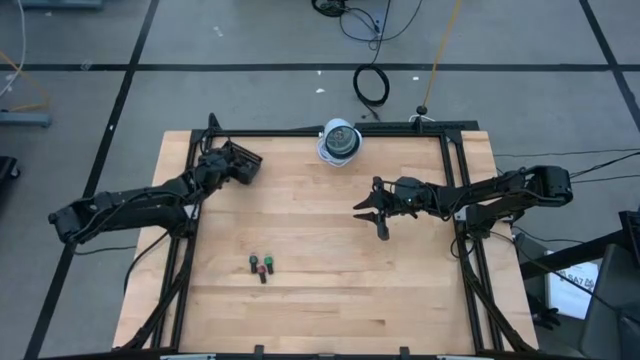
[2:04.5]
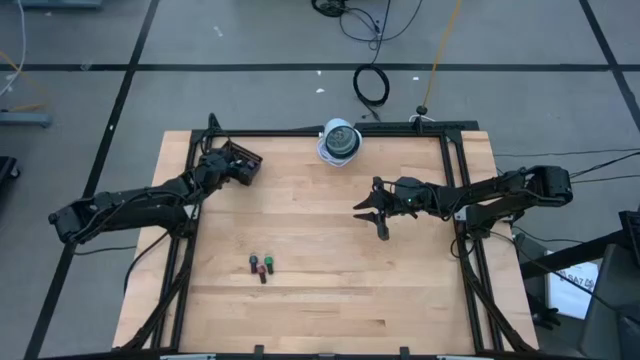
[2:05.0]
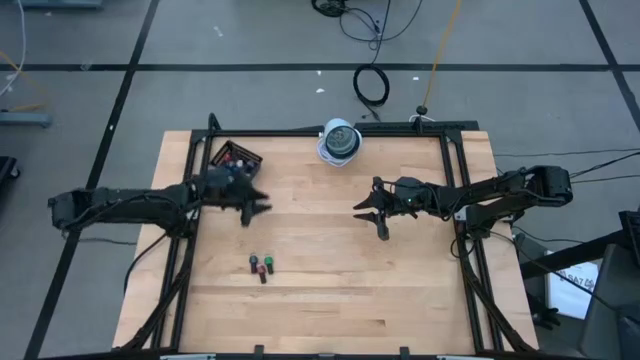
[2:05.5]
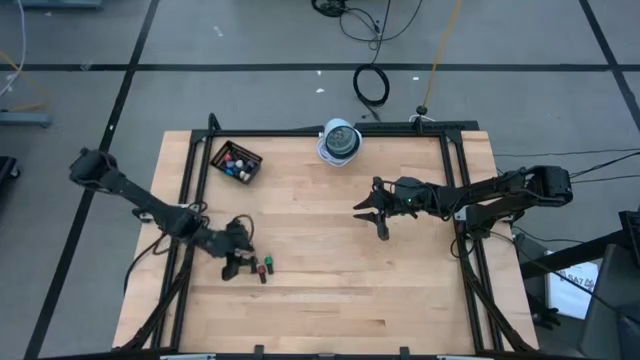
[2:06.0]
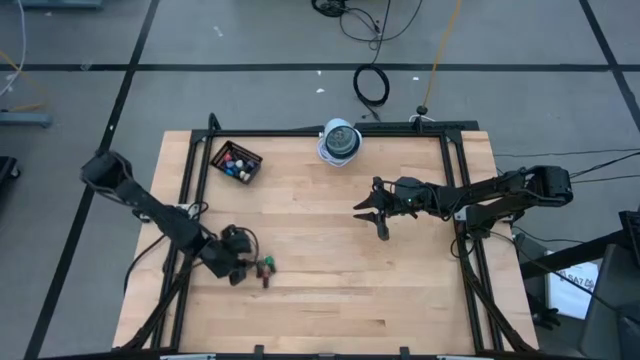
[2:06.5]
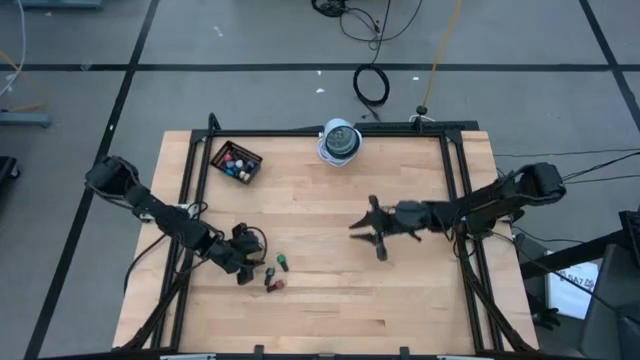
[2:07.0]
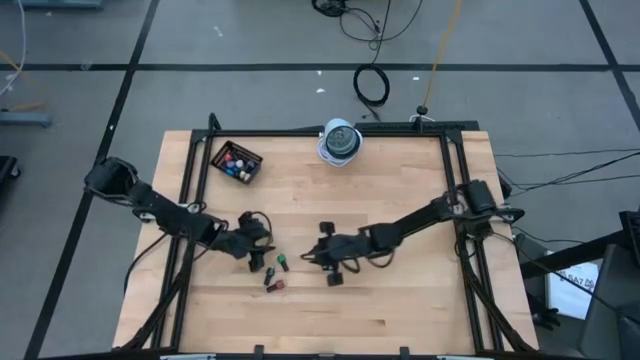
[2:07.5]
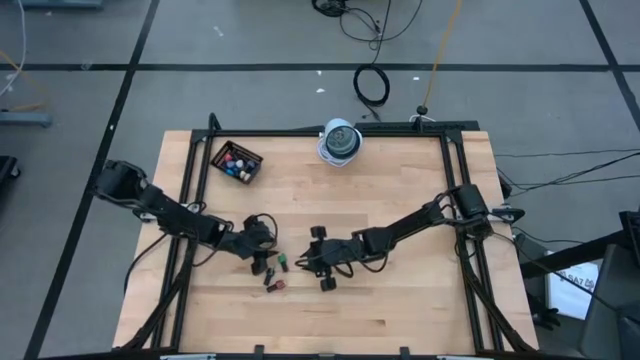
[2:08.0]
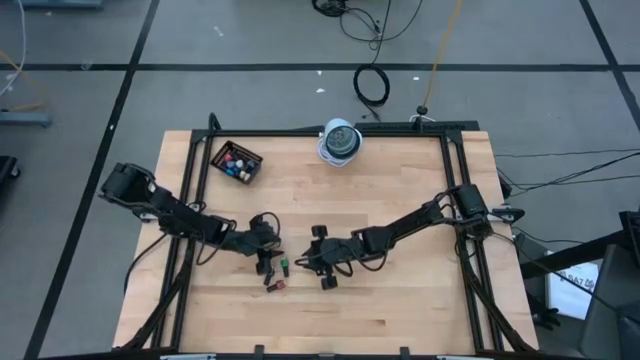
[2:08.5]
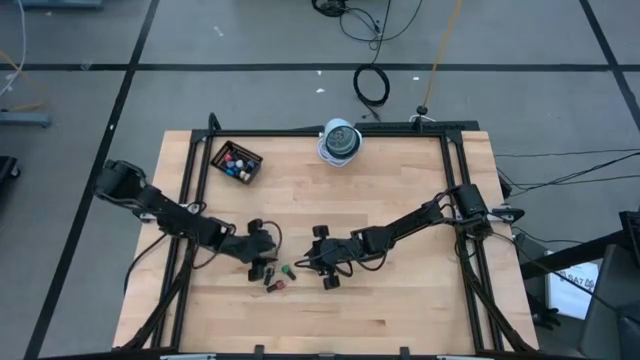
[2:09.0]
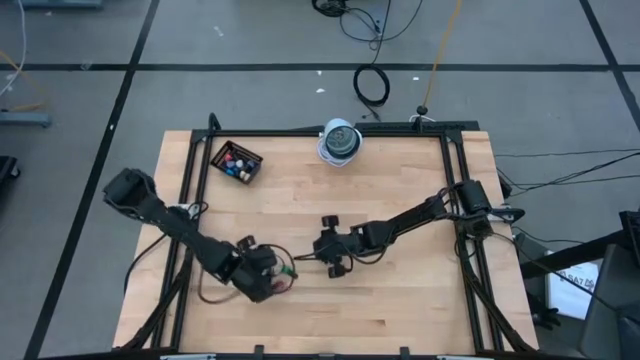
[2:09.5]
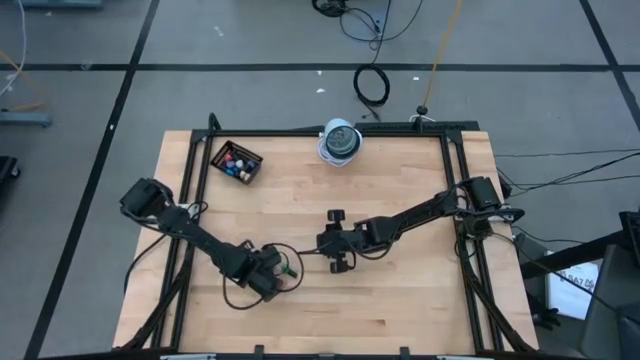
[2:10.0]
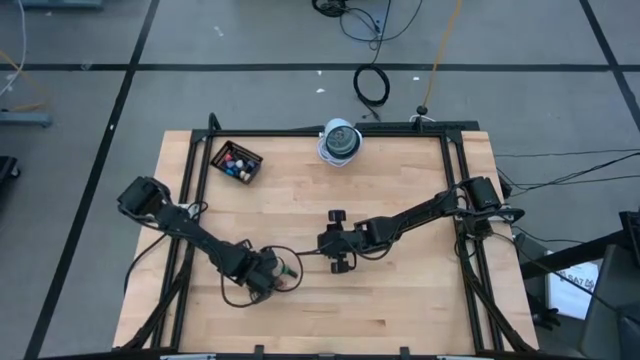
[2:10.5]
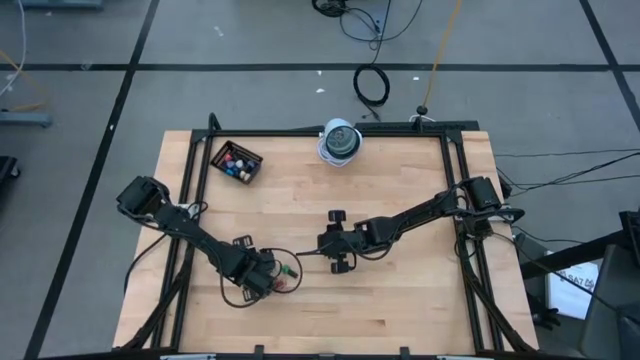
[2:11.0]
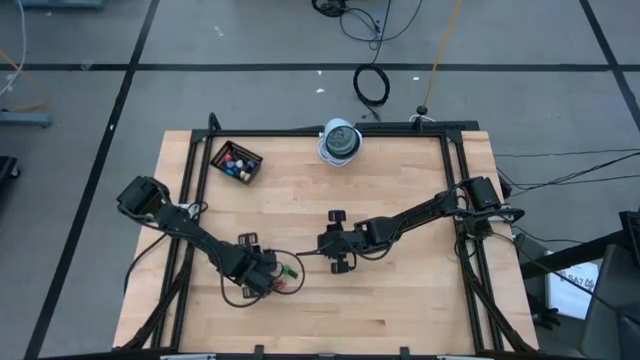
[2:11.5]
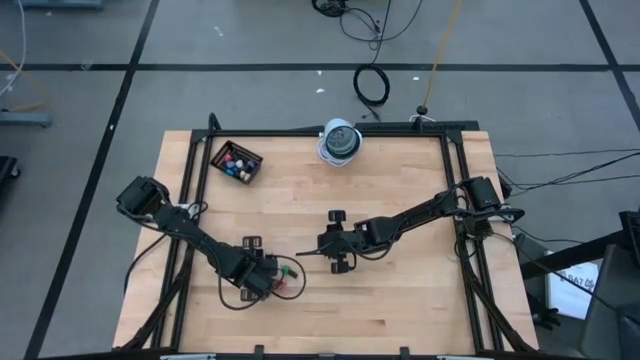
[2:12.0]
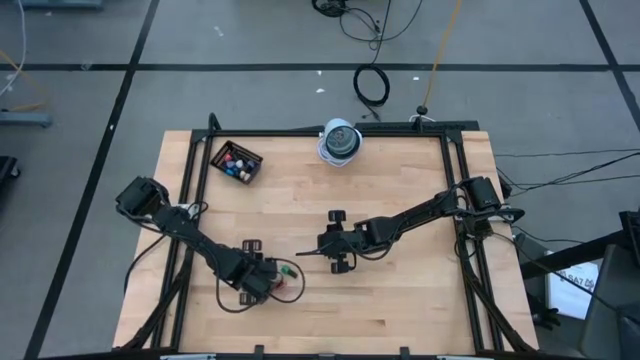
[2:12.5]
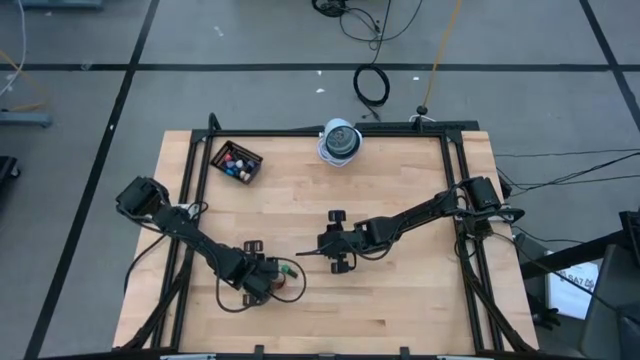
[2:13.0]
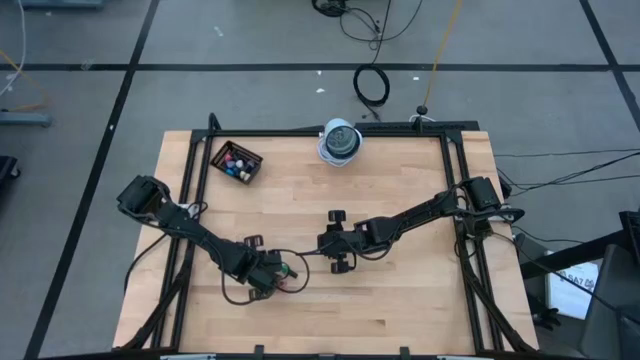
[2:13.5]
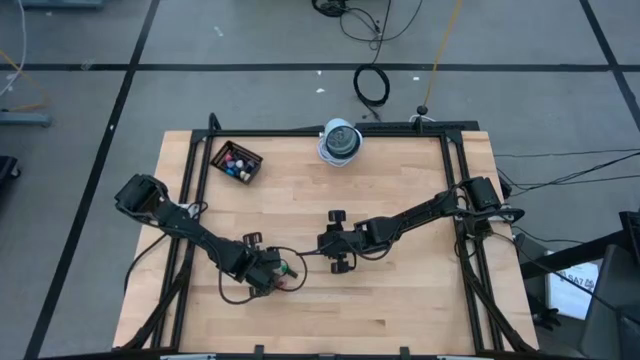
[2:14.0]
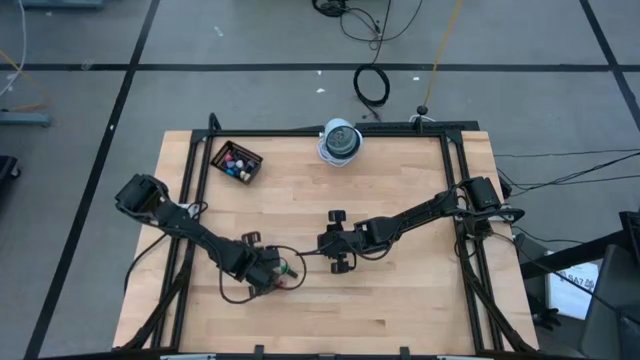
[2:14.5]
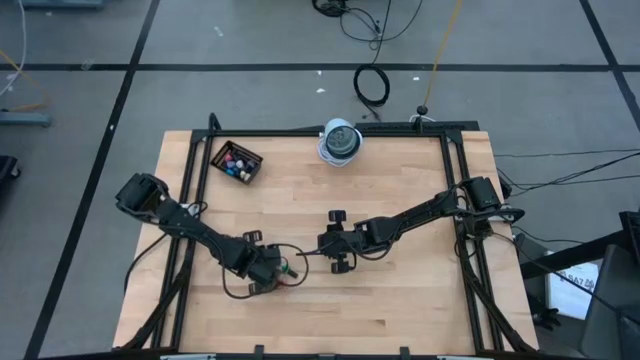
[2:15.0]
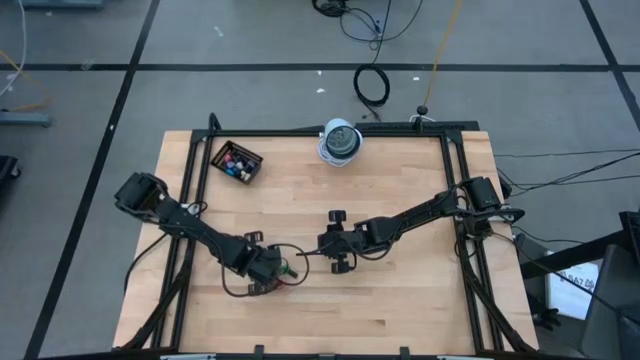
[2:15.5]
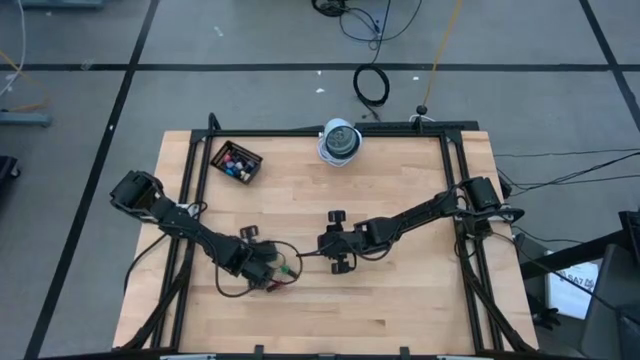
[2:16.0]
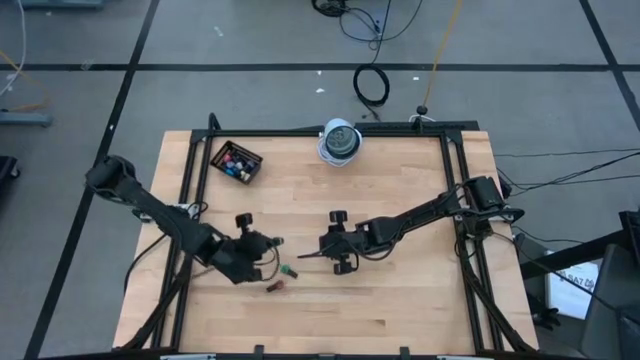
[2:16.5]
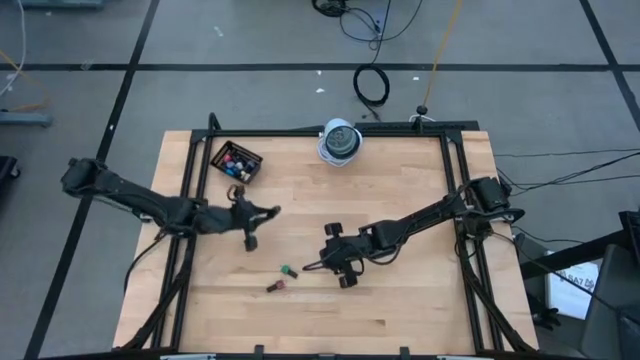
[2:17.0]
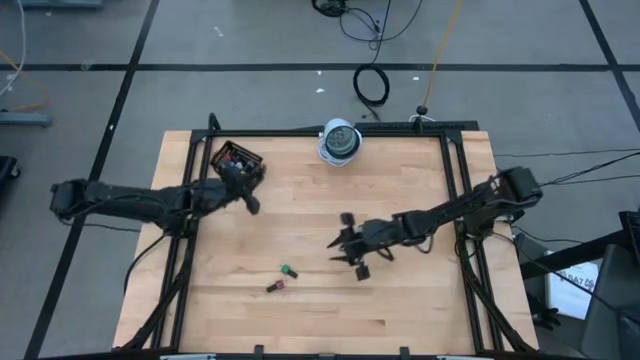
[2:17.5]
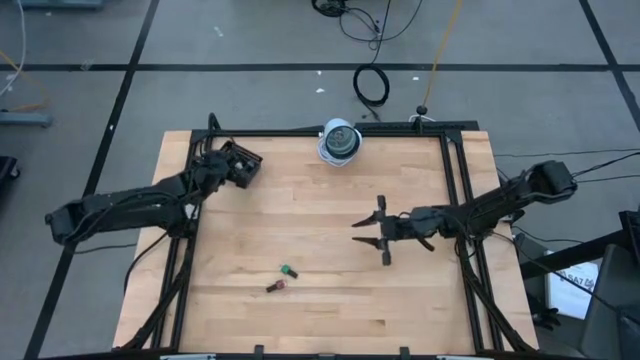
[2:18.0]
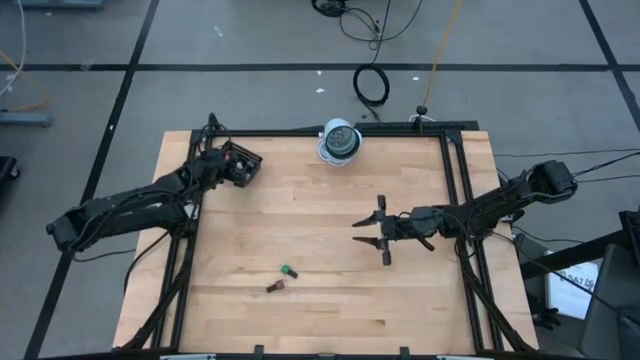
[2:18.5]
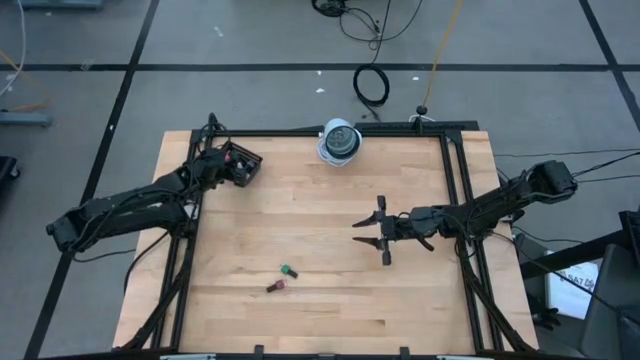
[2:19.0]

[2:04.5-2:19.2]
Task: Pick & Place Nail Polish
Put the dark green nail polish bottle into the black basket

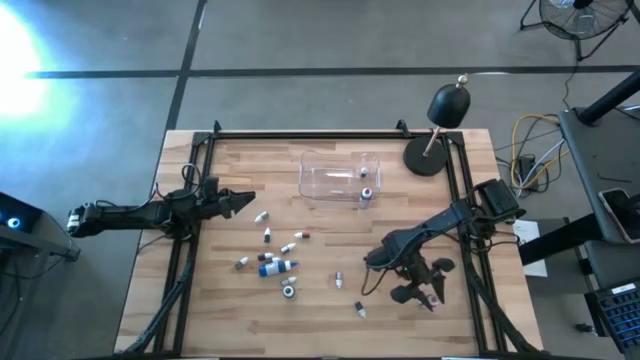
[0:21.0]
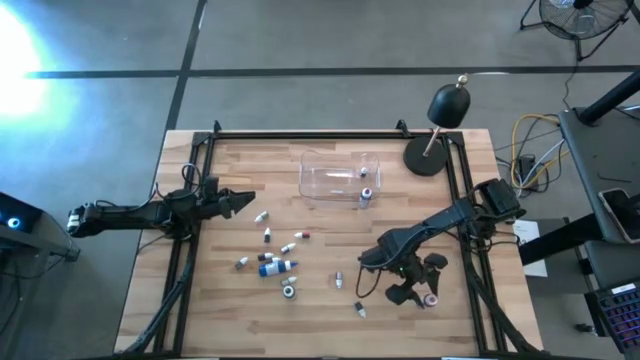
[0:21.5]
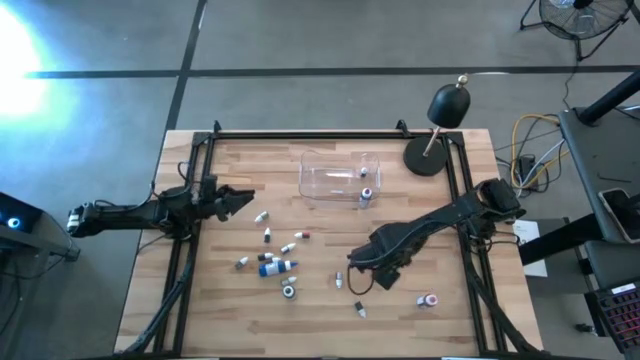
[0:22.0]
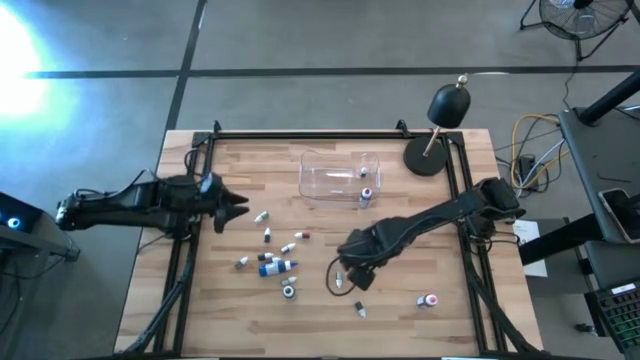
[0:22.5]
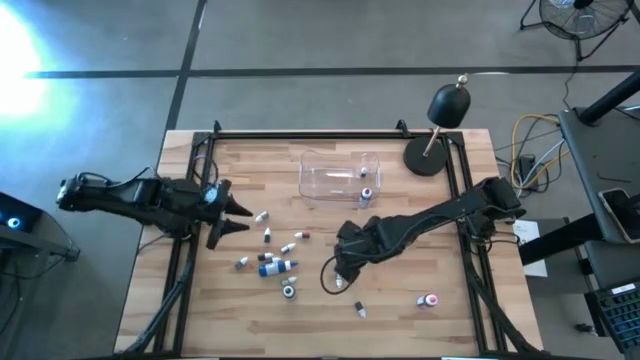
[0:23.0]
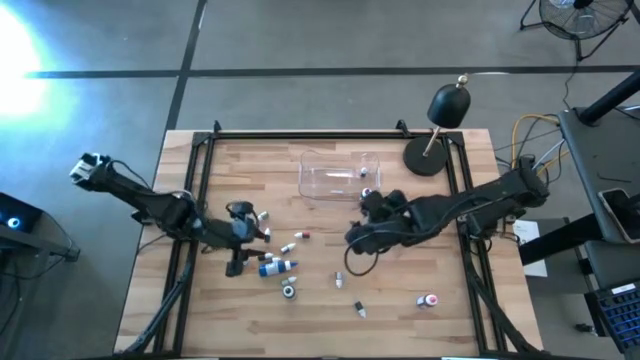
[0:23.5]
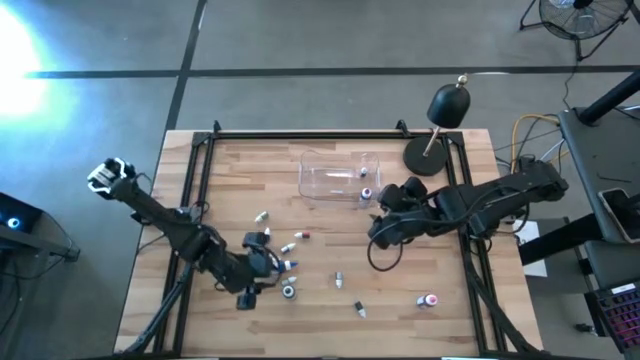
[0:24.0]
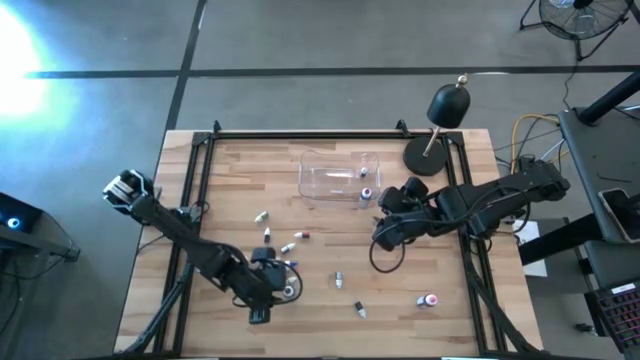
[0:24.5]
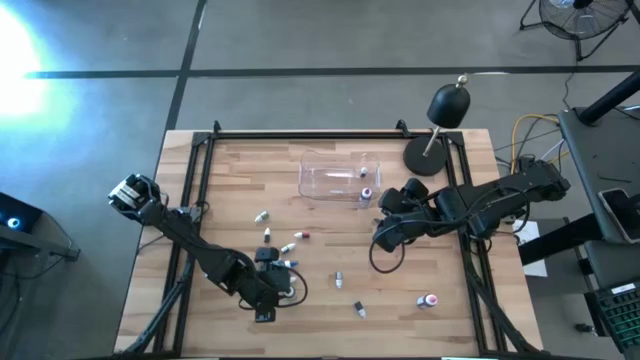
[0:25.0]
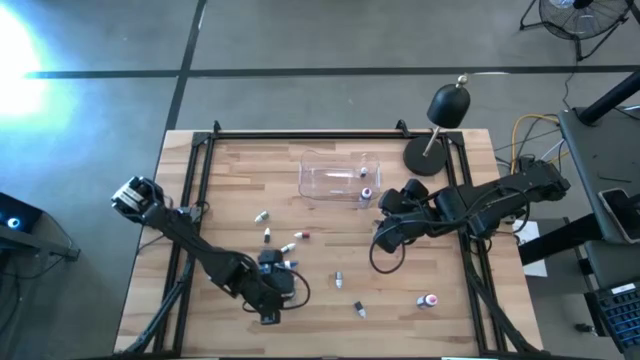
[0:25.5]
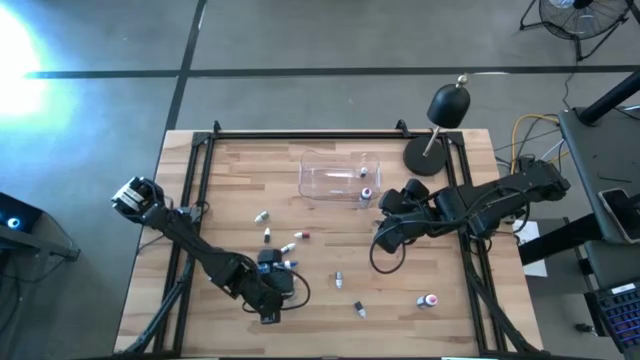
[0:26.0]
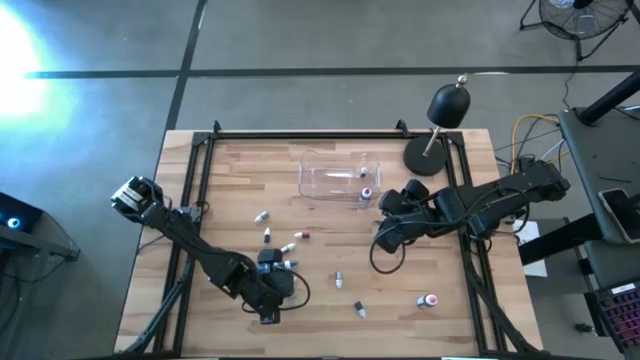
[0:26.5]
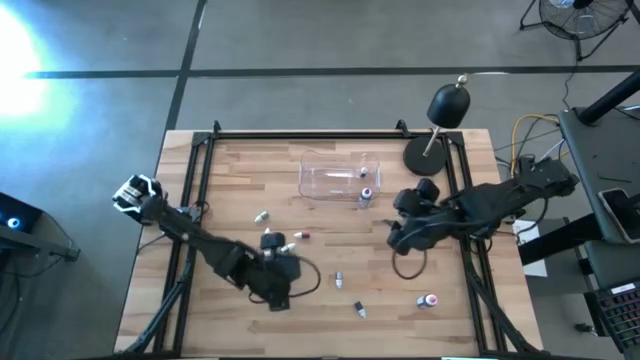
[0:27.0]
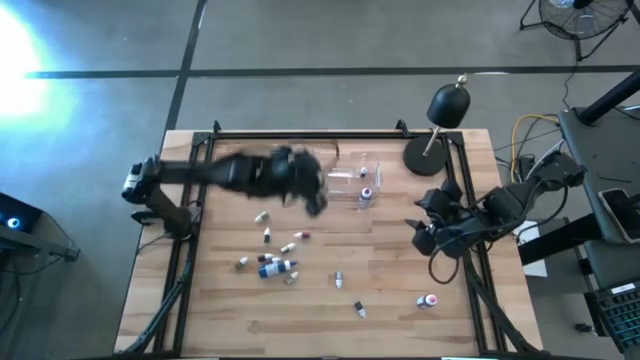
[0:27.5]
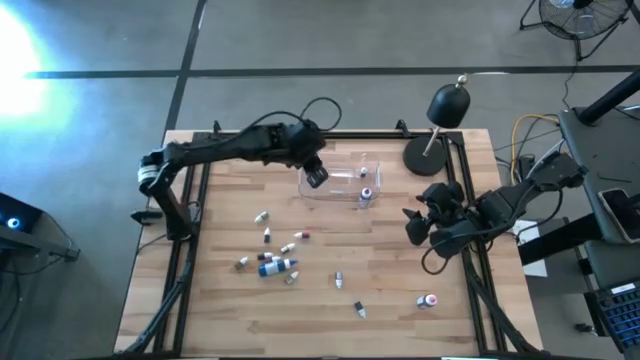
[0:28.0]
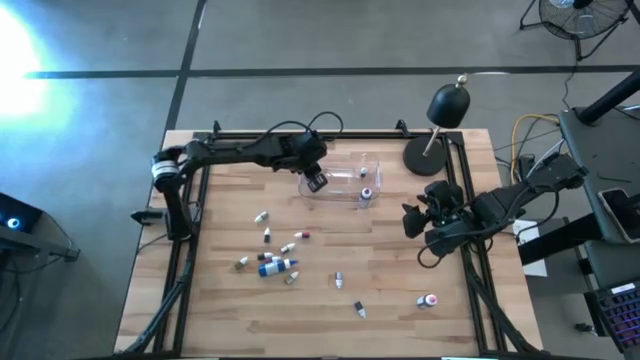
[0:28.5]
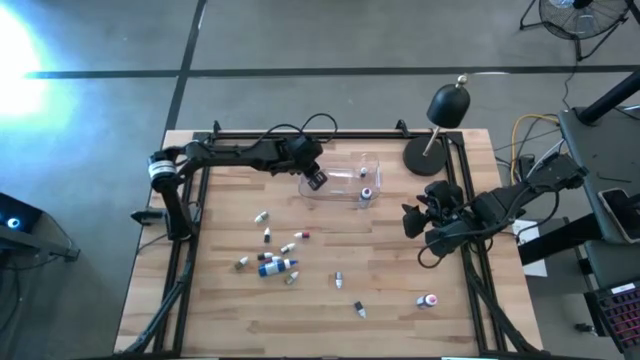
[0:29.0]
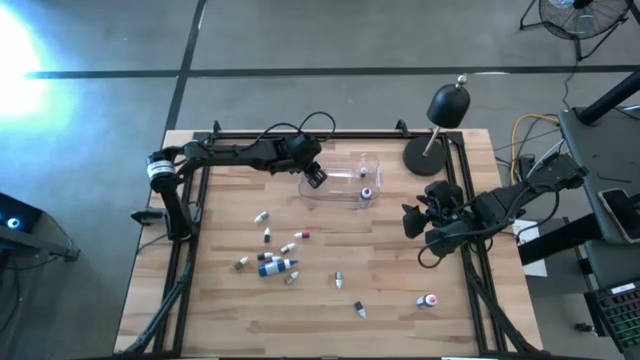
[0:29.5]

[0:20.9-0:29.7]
Task: Pick & Place food coloring
Put the big black food coloring bottle into the transparent bin
